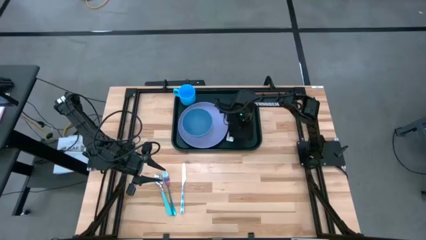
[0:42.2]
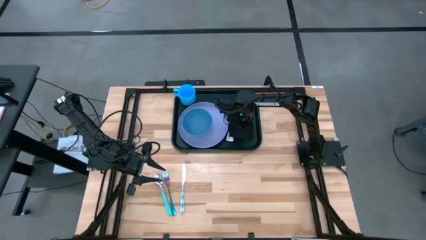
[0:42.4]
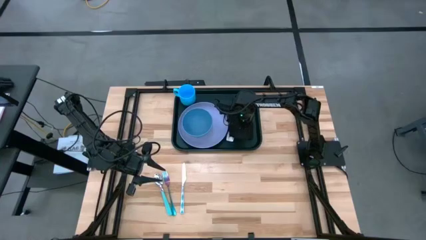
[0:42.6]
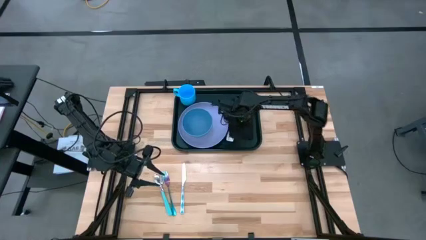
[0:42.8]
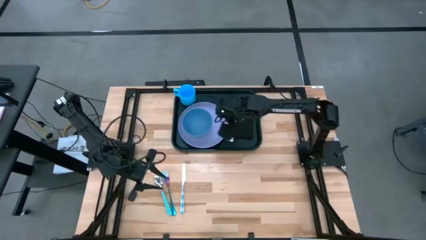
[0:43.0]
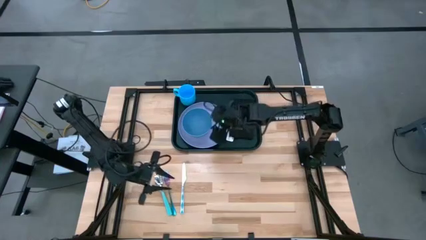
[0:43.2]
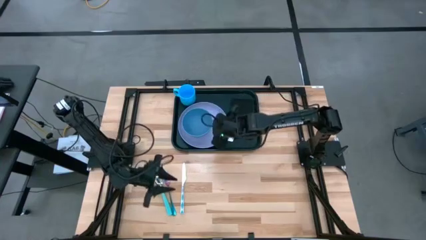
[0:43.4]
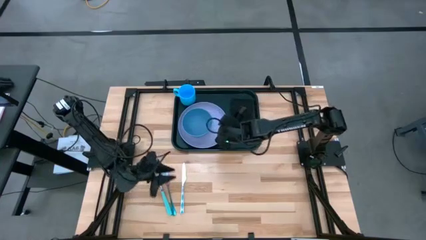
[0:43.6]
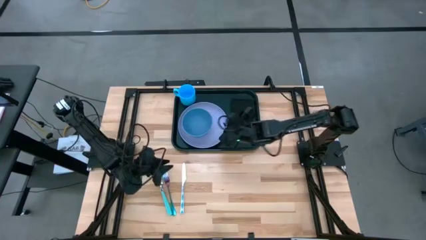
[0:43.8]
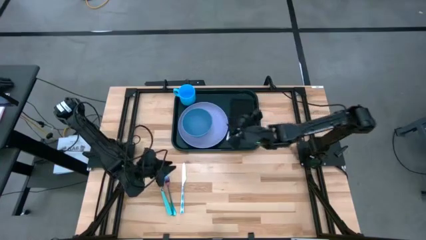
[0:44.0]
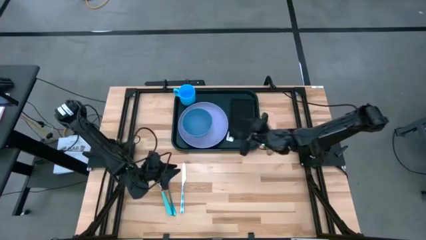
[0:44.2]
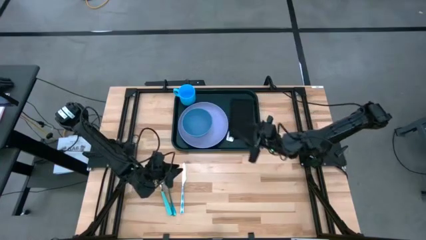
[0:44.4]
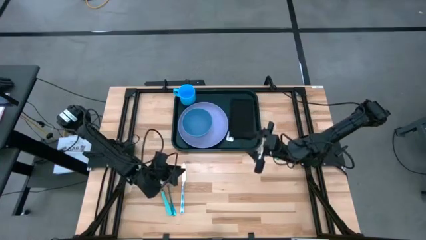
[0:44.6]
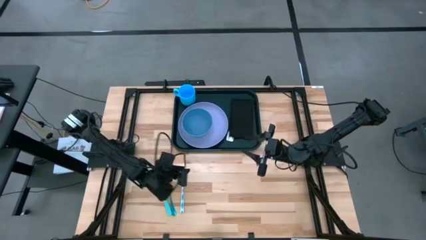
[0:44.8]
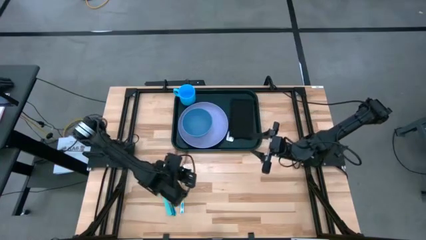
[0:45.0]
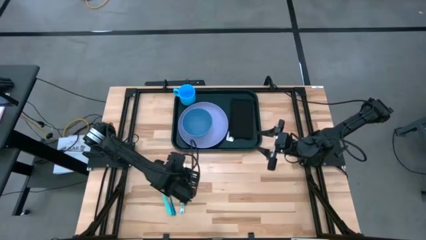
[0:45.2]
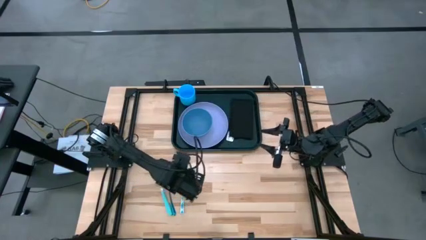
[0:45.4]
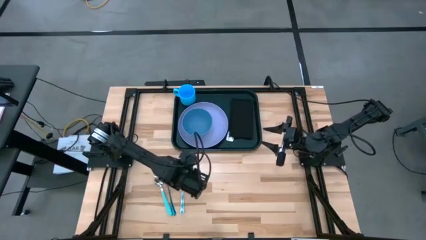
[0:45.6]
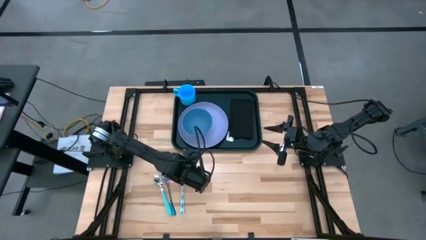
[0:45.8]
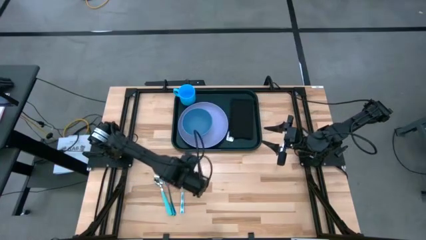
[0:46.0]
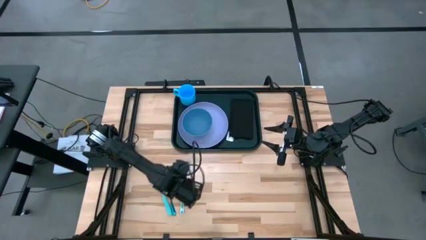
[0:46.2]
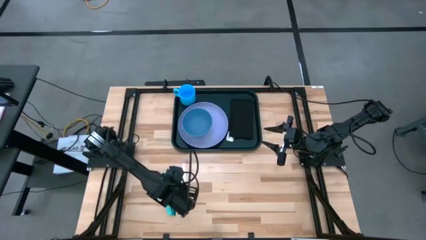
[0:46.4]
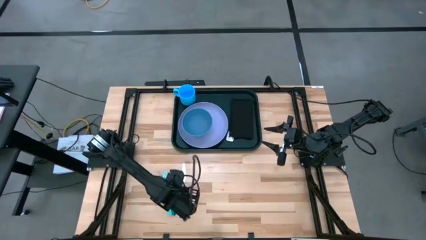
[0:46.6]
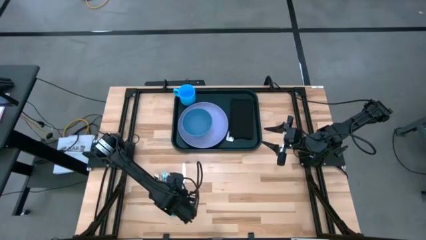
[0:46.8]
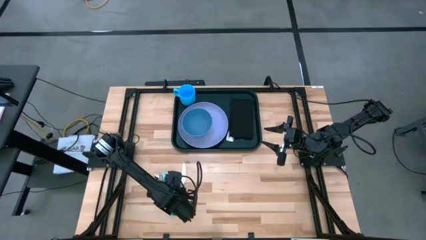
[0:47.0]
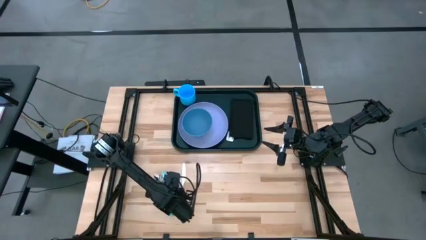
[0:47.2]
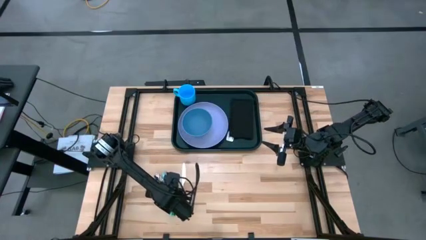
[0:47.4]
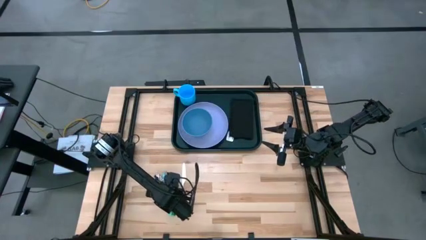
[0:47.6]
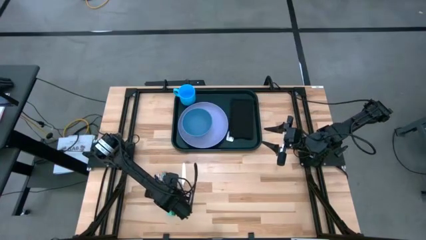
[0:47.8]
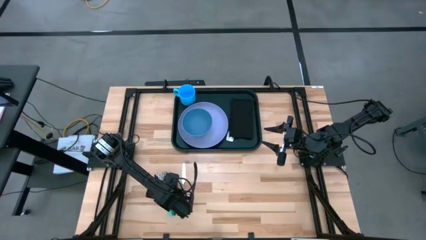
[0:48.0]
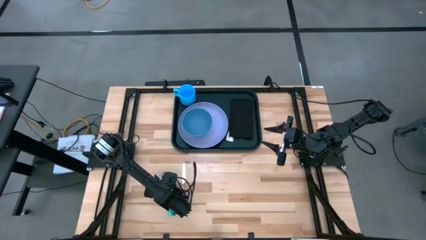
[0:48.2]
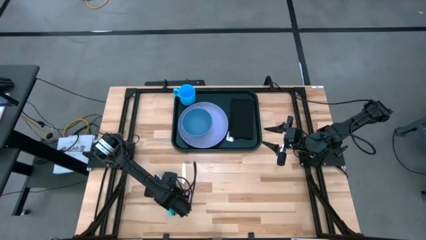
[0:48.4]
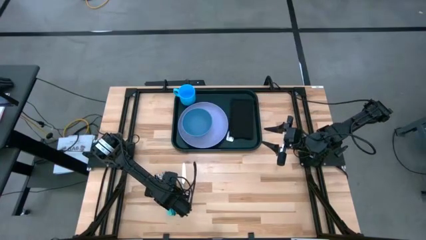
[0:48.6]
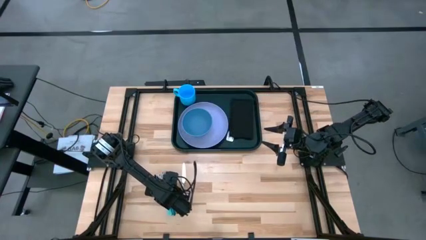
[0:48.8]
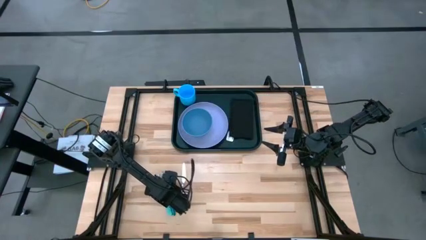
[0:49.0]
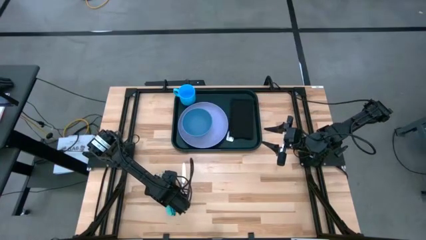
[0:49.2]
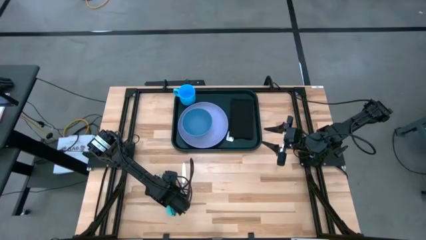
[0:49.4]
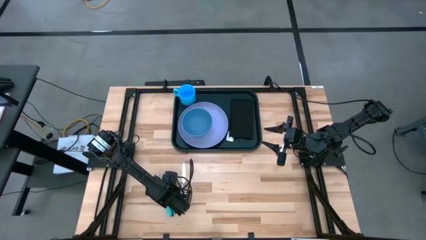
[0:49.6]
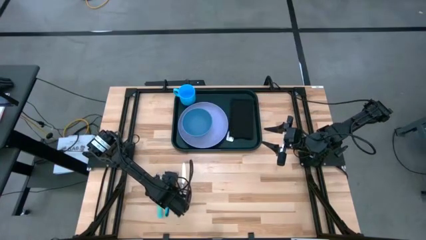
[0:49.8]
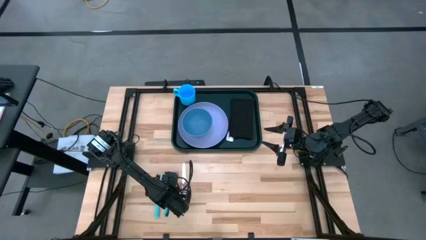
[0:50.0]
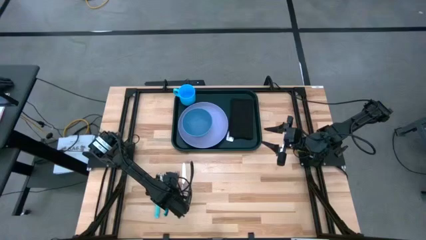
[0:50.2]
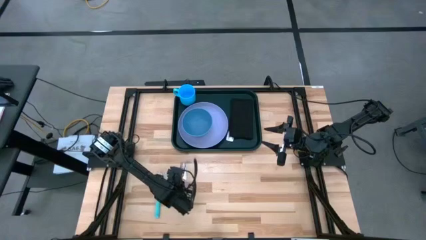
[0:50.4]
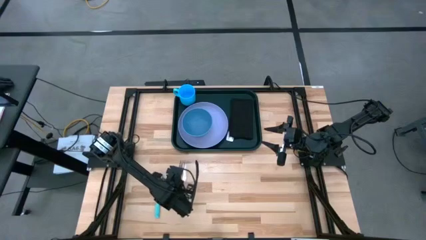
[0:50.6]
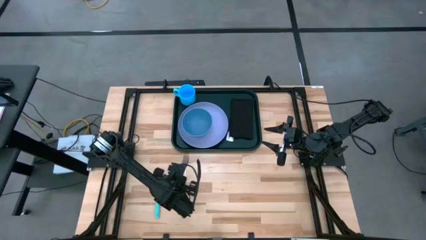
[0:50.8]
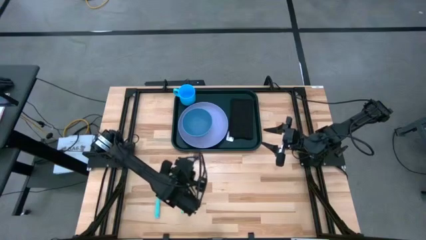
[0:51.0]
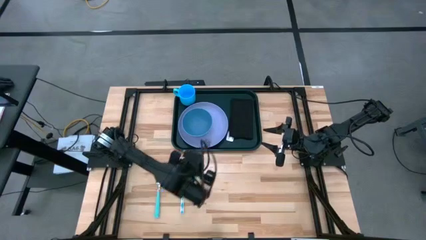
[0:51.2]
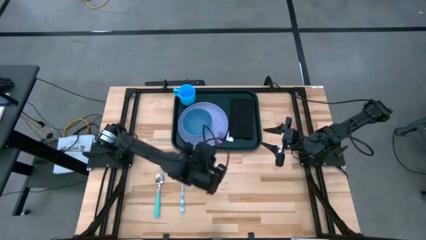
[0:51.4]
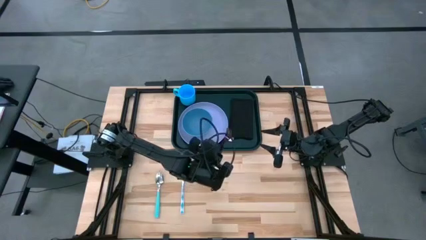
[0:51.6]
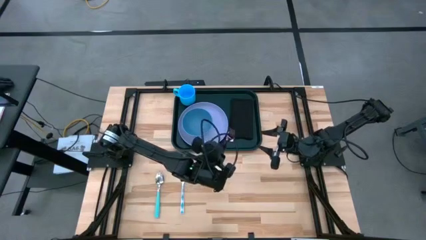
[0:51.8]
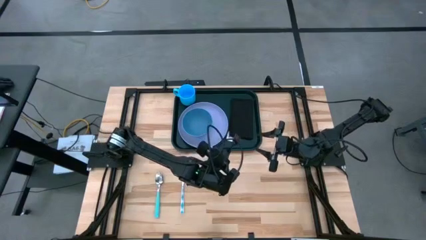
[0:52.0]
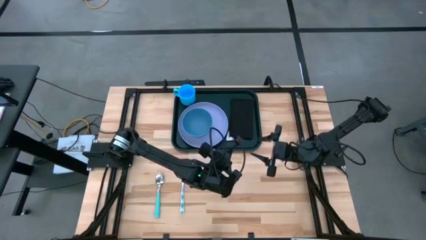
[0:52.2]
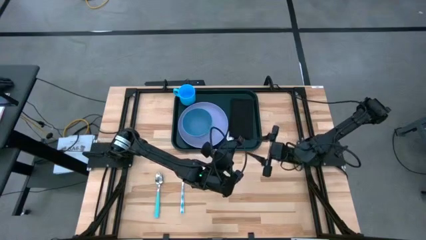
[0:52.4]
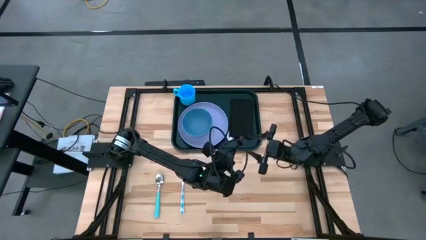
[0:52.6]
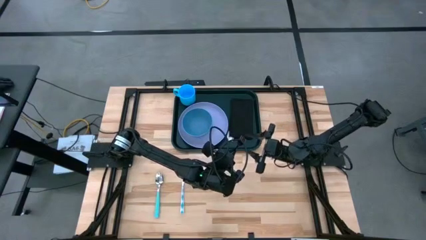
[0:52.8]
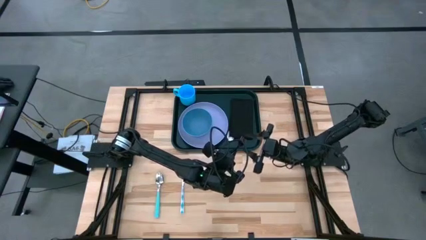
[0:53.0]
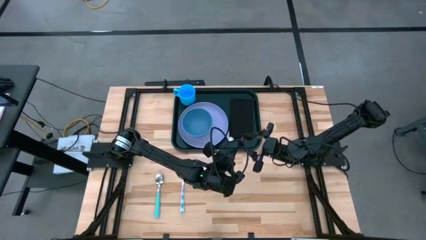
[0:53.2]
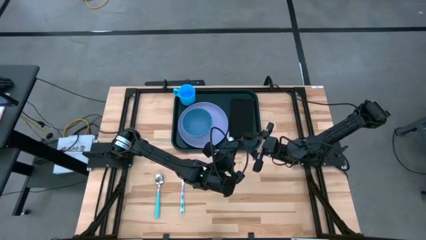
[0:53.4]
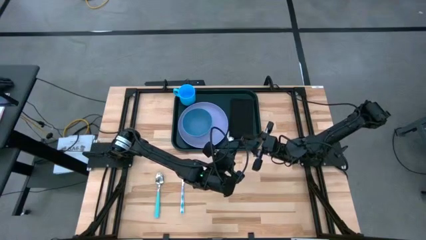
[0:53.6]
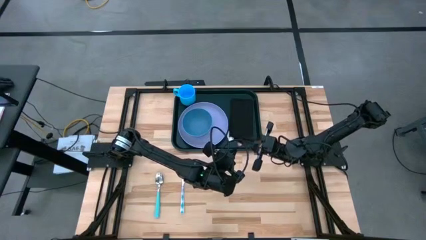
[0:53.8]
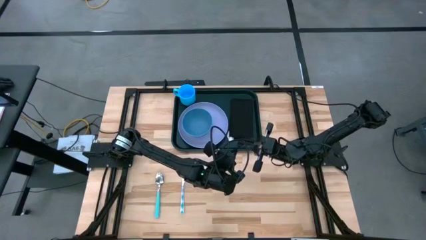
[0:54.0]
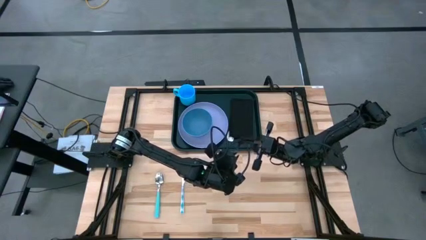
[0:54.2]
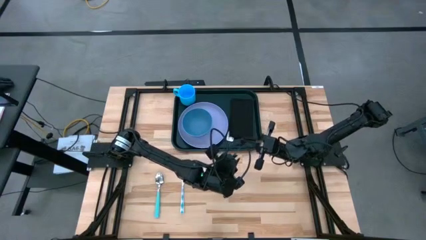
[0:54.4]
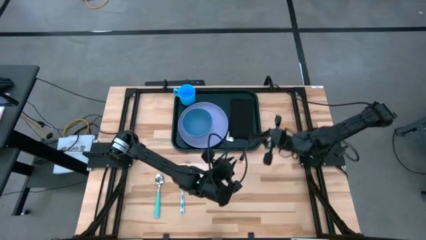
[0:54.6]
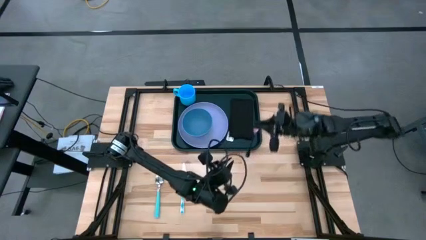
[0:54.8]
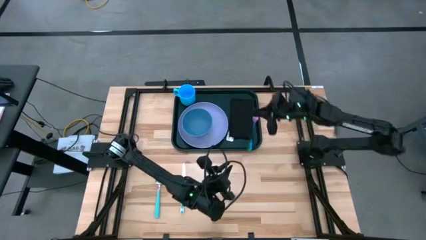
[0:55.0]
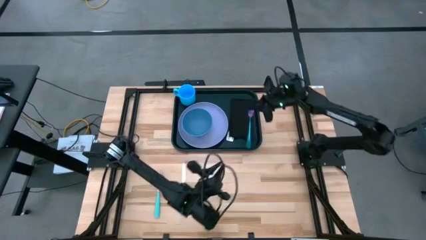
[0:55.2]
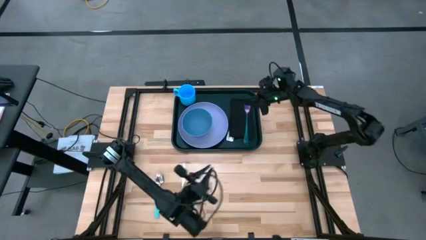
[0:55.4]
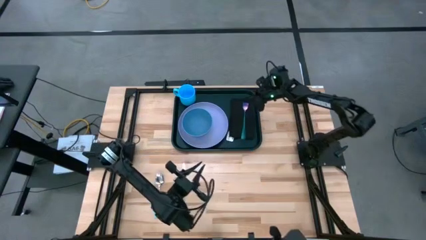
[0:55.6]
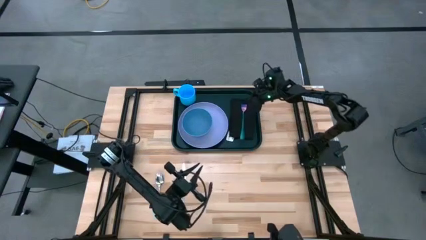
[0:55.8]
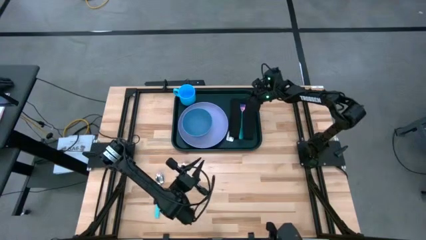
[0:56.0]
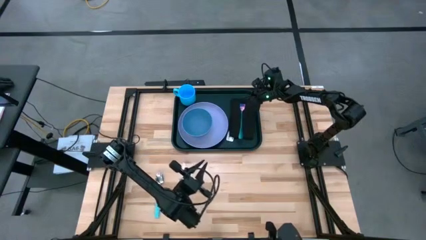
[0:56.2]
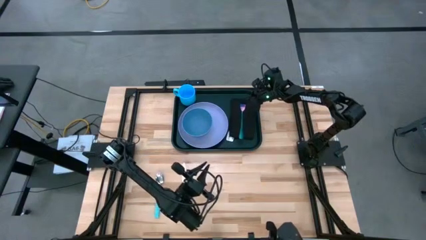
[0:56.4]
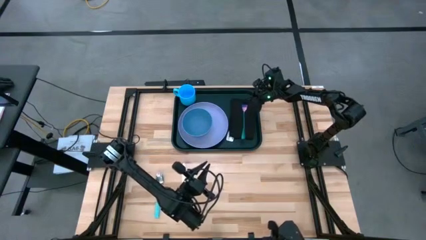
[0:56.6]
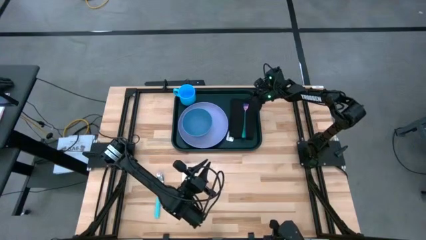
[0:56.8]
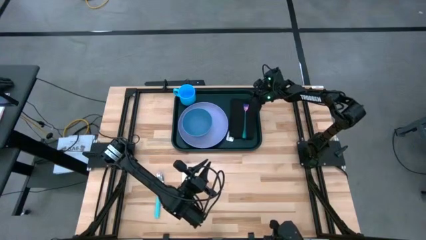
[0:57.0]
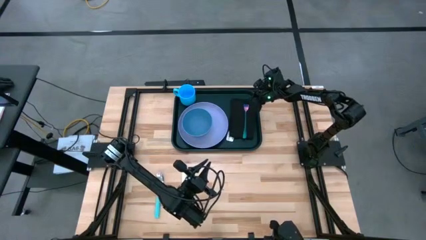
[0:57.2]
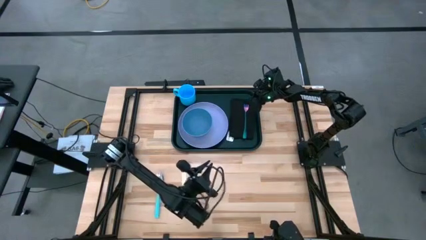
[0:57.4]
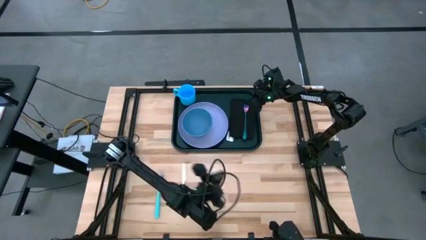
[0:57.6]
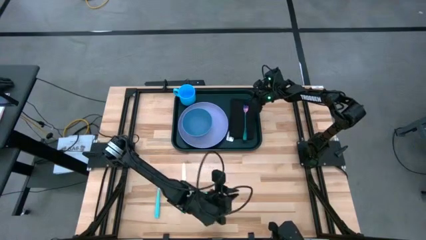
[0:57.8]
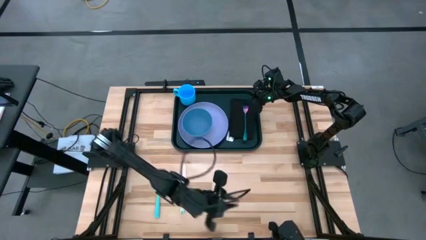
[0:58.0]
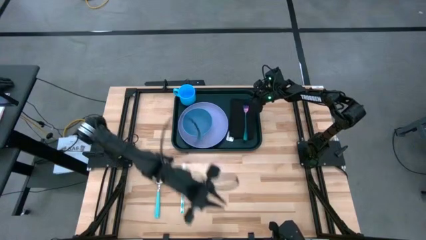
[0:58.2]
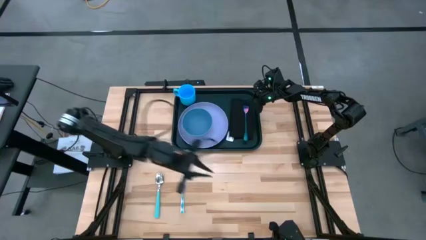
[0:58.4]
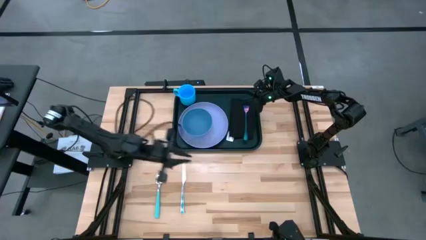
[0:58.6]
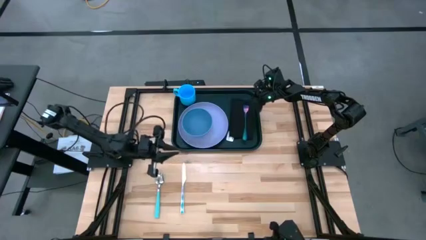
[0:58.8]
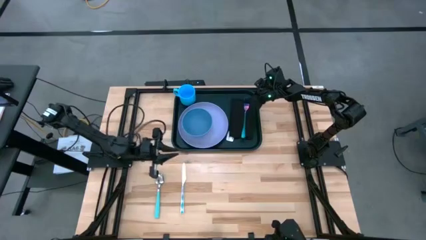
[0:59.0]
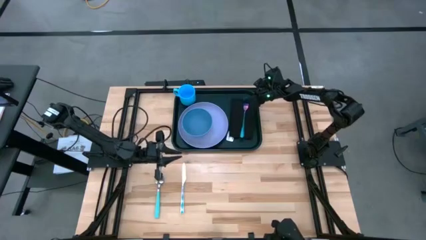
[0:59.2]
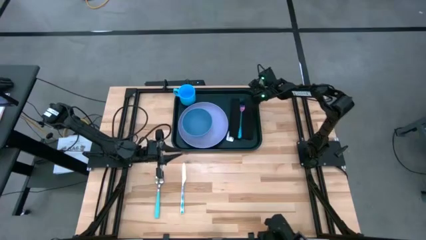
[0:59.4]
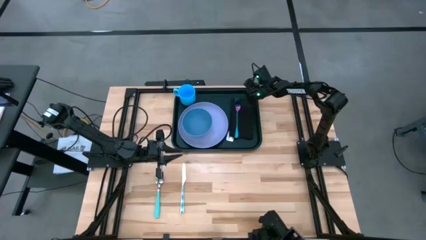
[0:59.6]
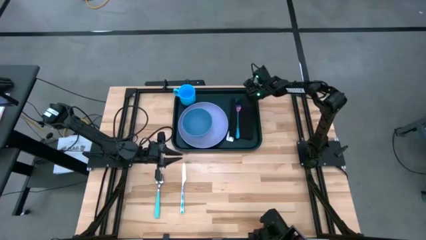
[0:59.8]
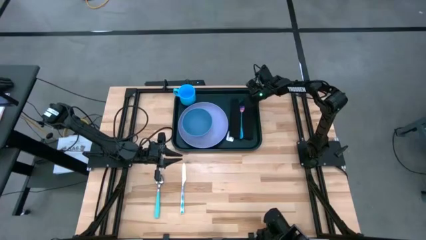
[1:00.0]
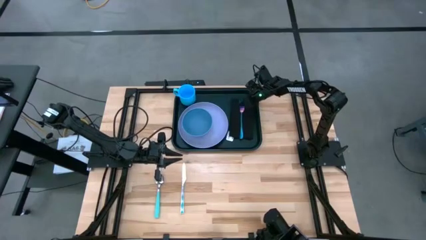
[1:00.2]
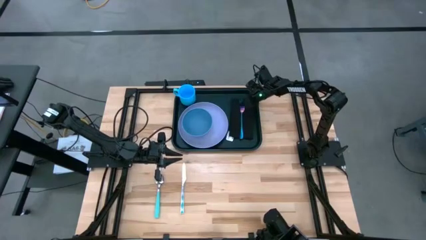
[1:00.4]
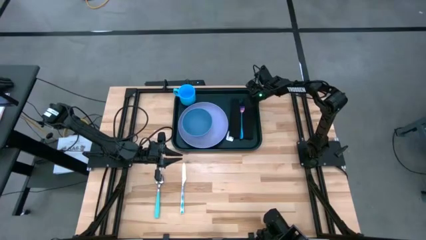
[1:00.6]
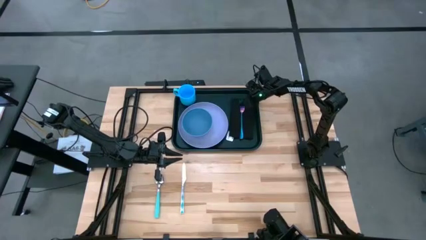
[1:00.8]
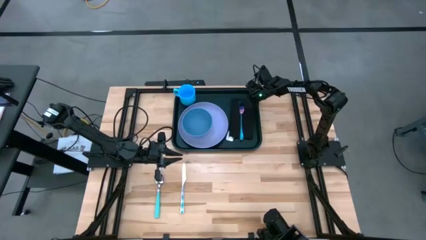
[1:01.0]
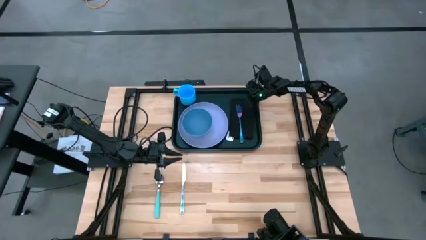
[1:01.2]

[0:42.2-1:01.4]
Task: Set up tray
Put the blue fork on top of the black napkin on the black tray
